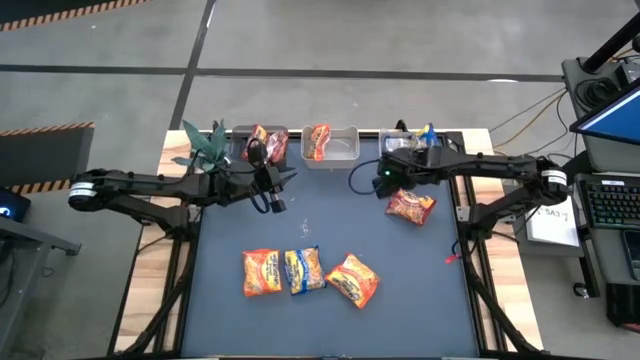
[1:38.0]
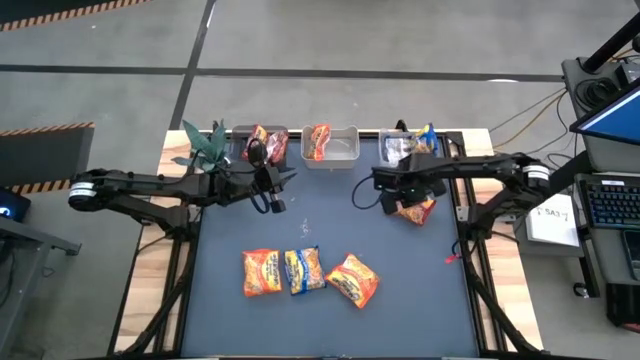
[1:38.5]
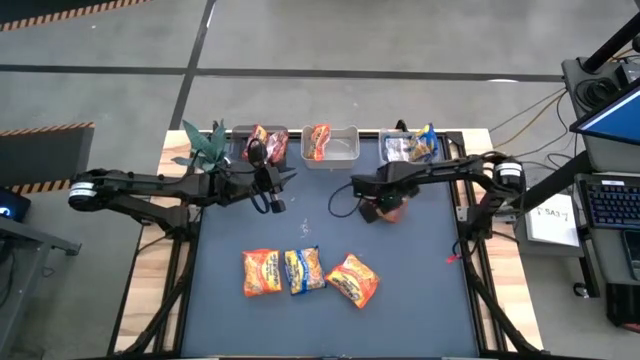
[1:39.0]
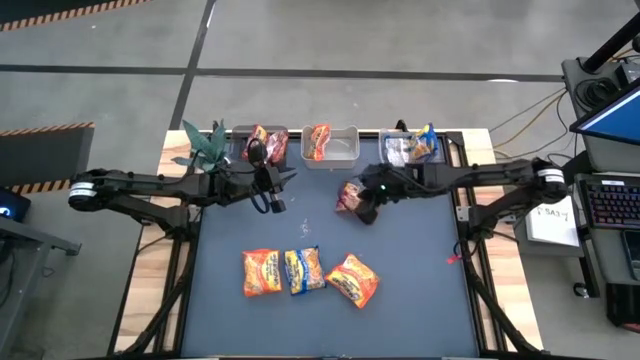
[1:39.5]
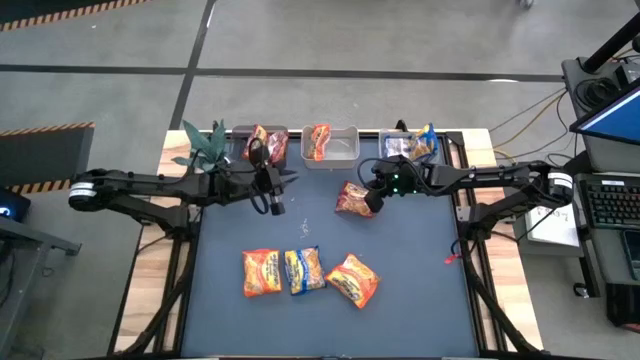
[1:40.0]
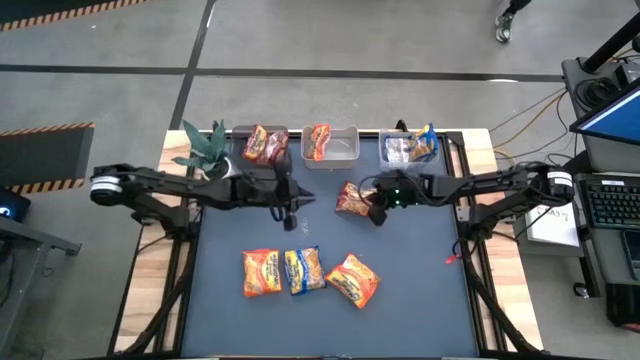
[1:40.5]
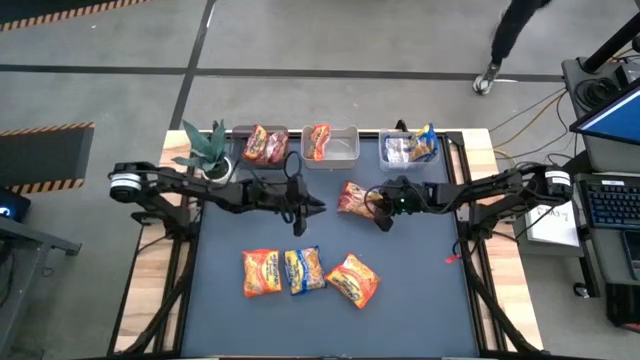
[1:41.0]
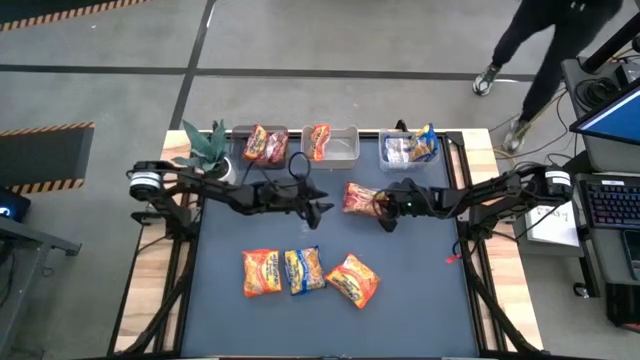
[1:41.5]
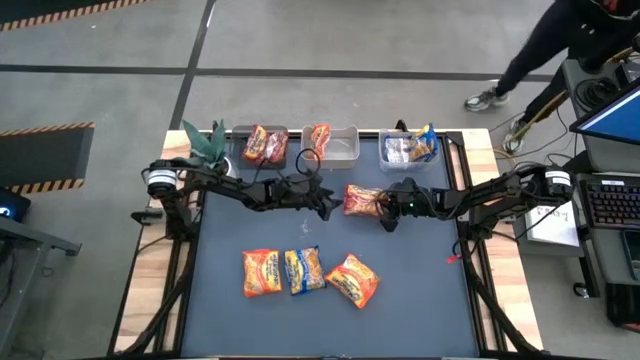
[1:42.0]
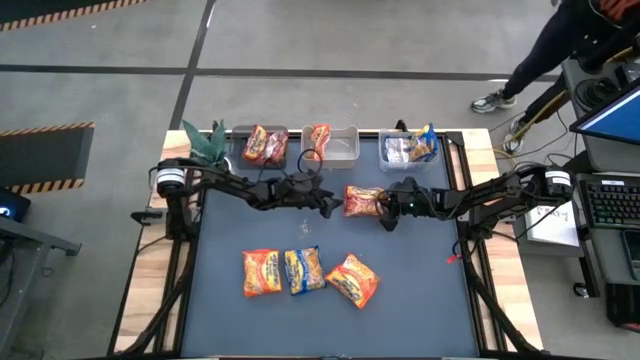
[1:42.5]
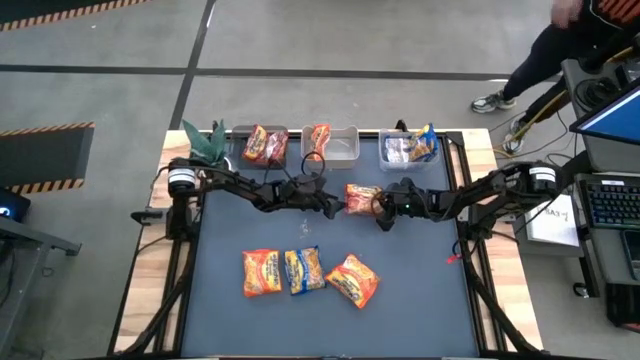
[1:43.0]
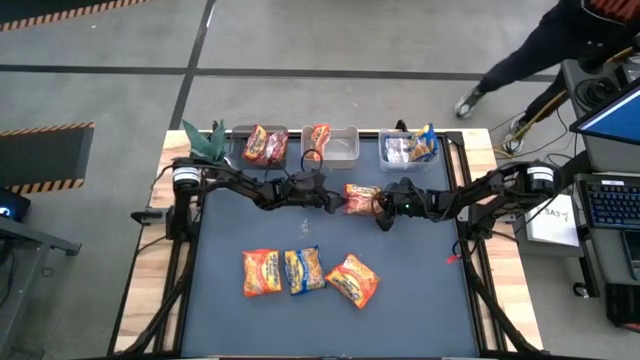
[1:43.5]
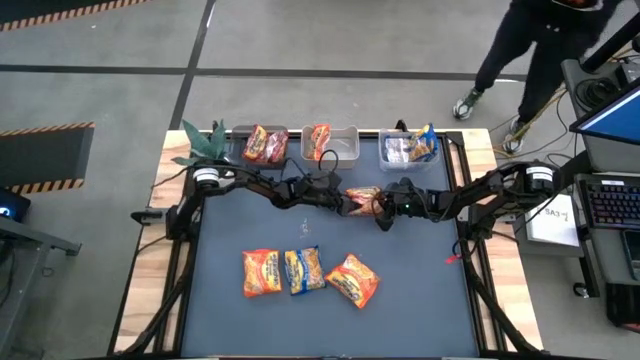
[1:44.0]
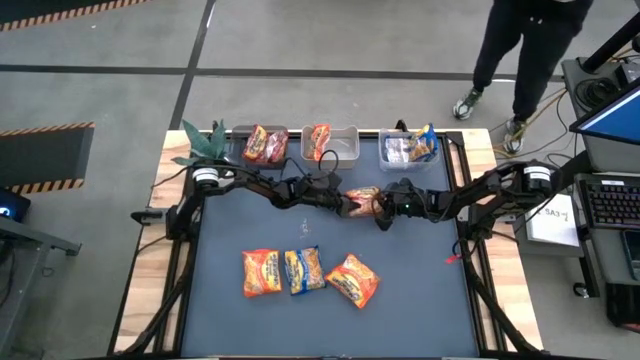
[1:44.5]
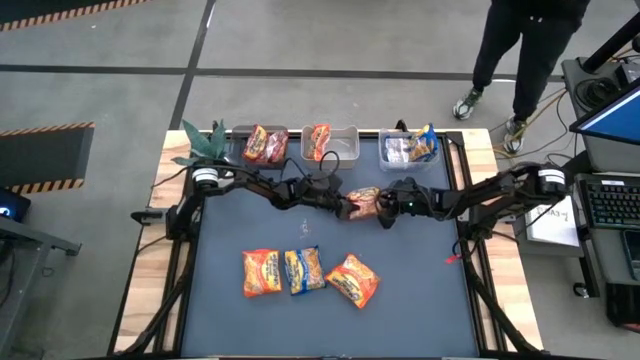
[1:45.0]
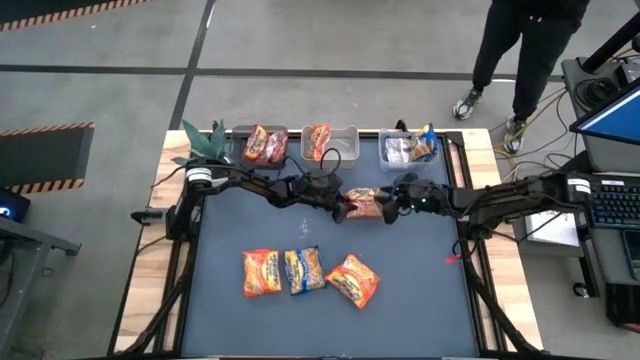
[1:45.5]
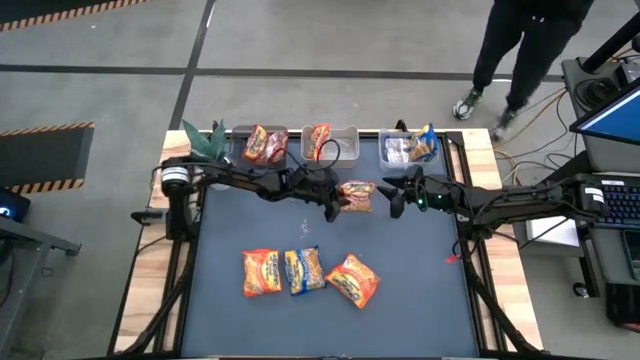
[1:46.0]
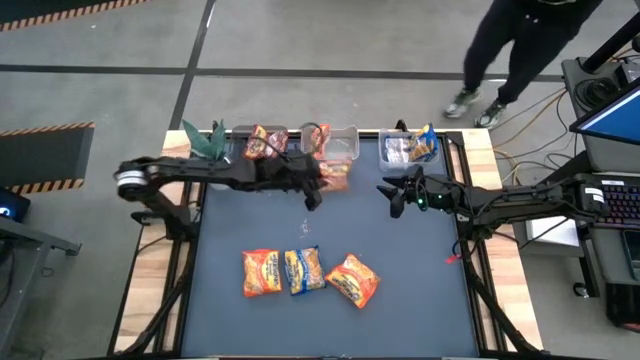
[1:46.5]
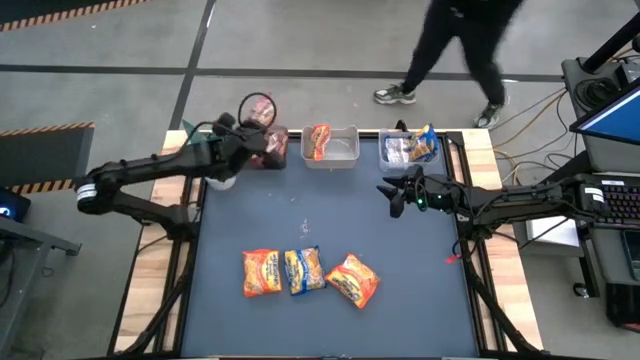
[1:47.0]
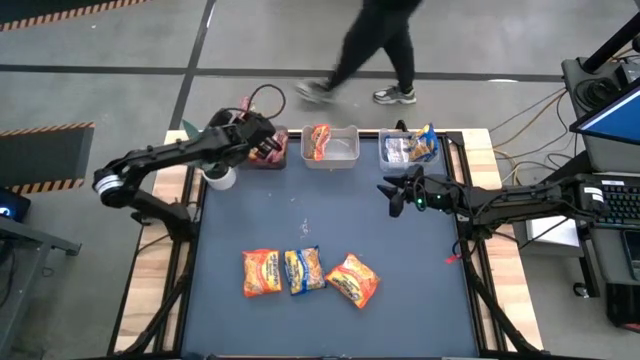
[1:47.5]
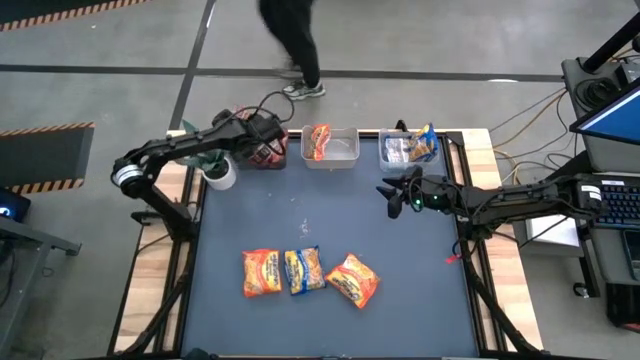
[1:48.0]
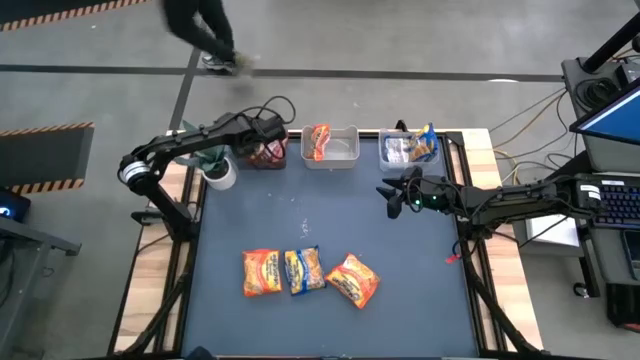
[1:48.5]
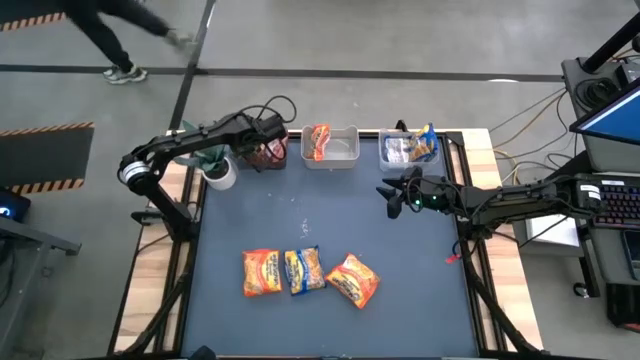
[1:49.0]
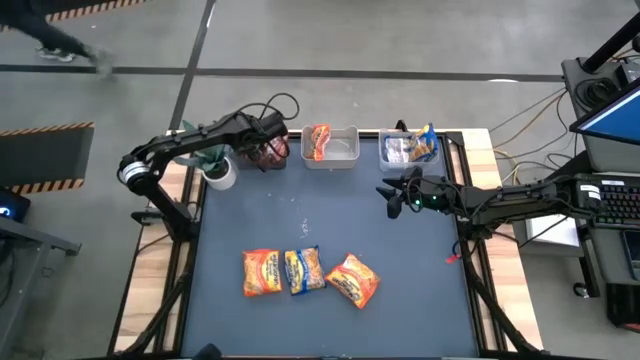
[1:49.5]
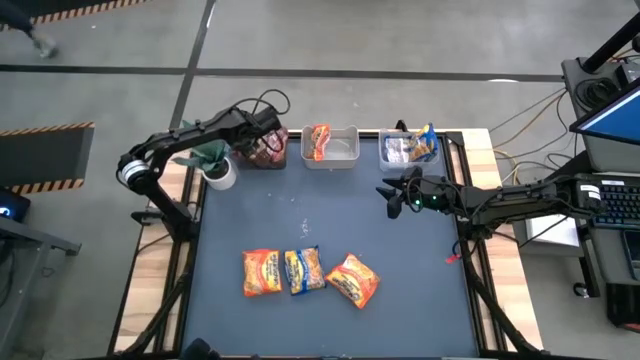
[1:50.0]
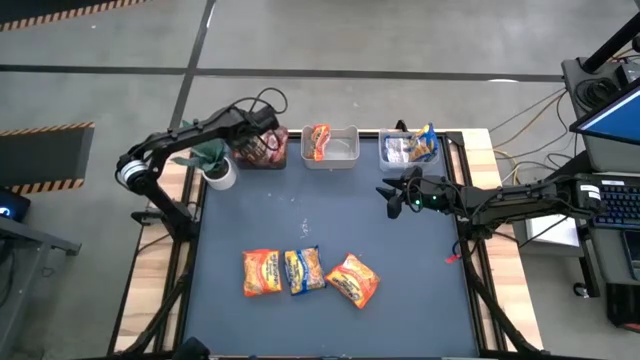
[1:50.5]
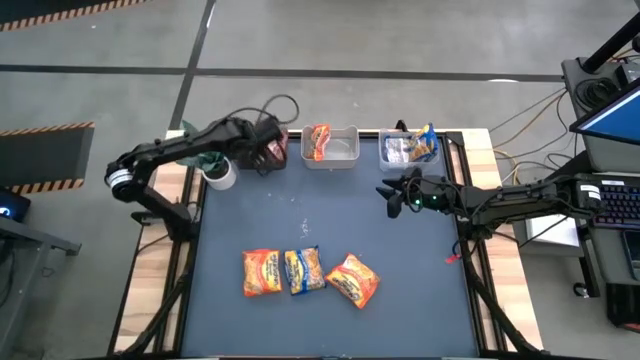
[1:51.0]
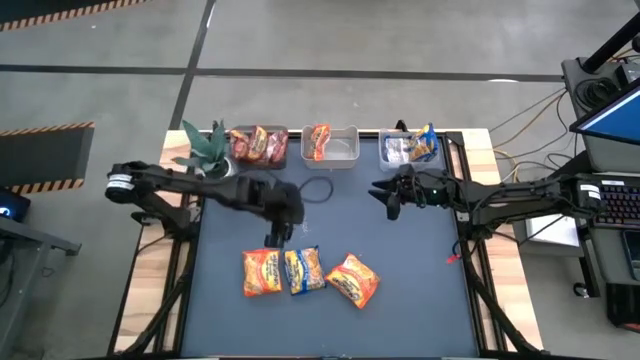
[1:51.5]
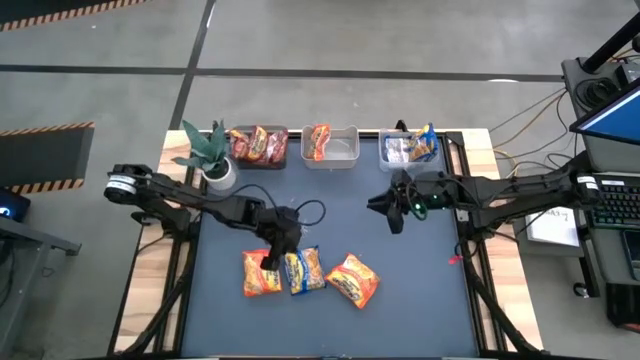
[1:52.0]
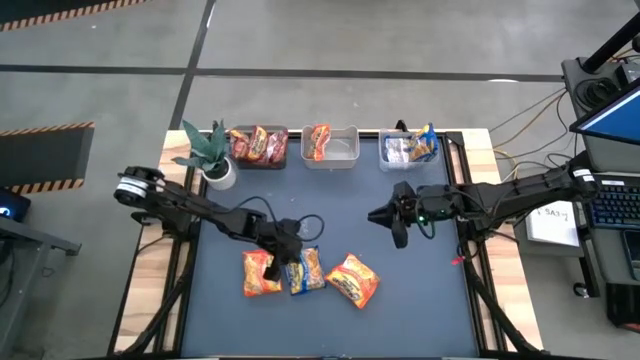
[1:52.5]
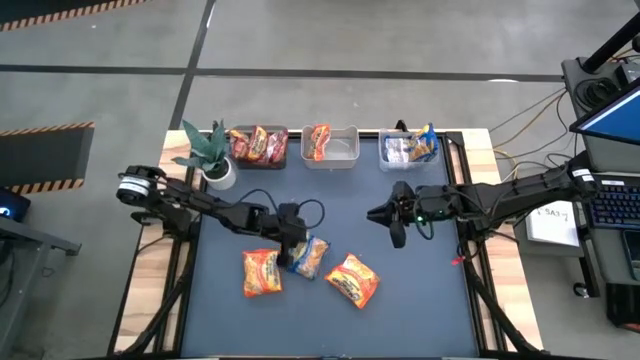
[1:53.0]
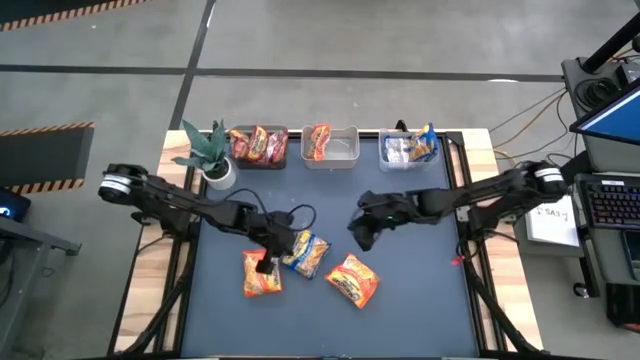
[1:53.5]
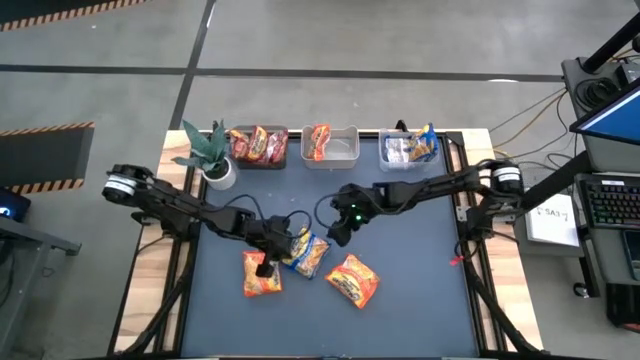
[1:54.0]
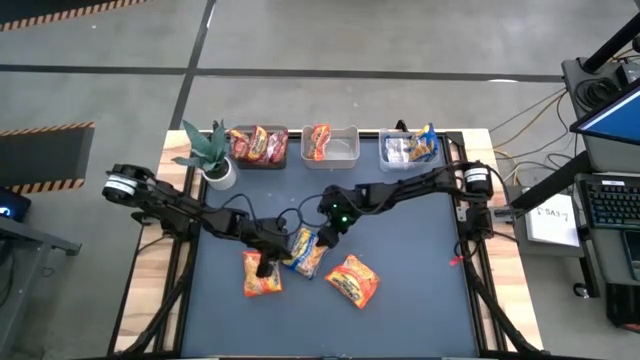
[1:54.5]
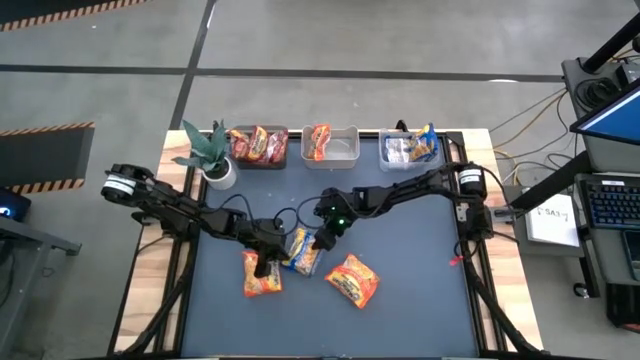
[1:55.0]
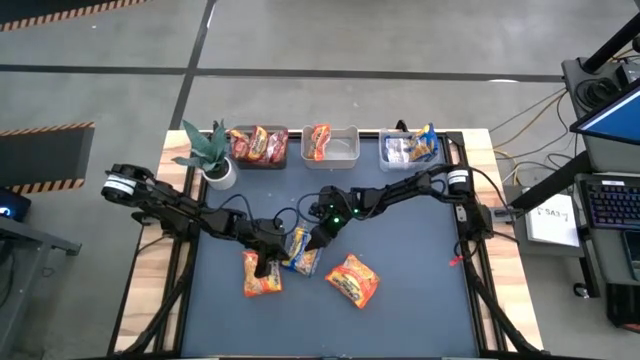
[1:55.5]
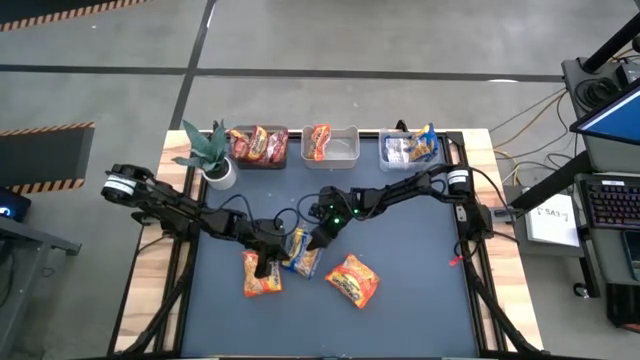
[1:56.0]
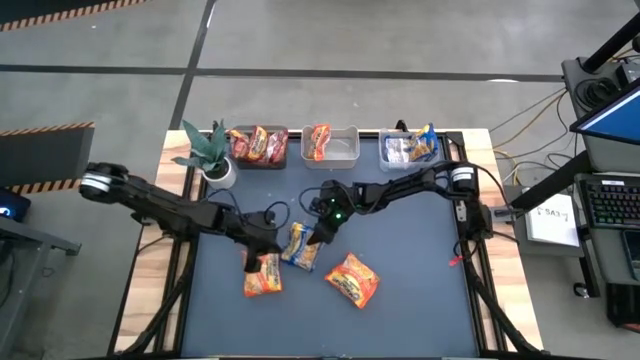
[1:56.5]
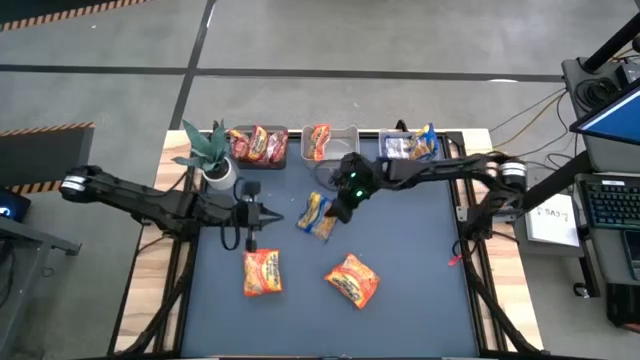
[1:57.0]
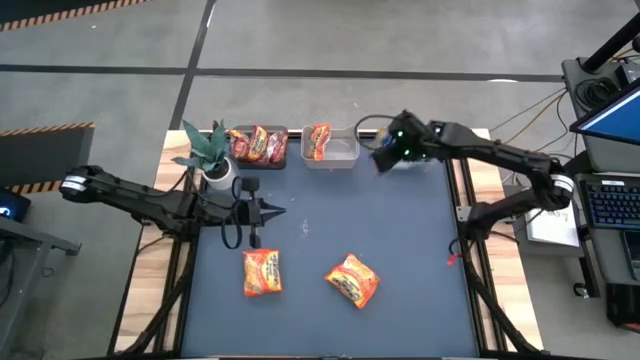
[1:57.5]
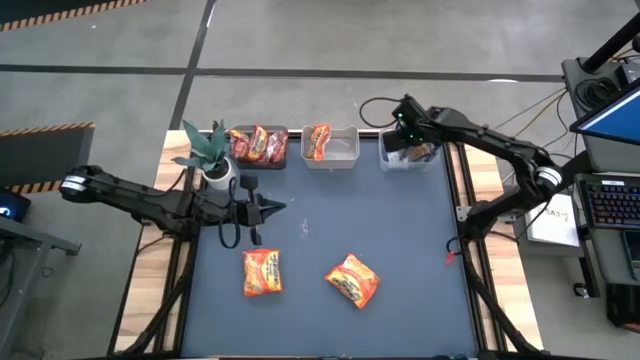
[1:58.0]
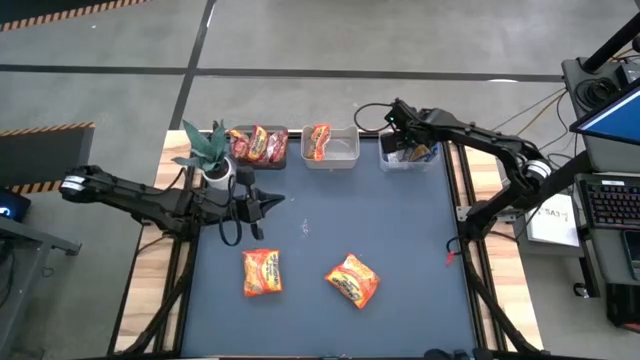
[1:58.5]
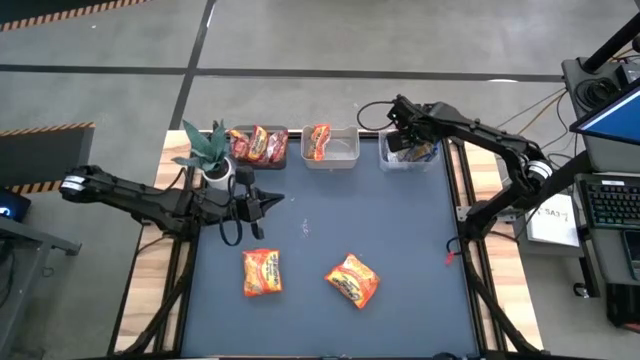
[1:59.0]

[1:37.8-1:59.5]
Task: Sort Maruchan noodles
Put the red noodle pack into the transparent black bin Put the blue noodle pack into the transparent white bin
